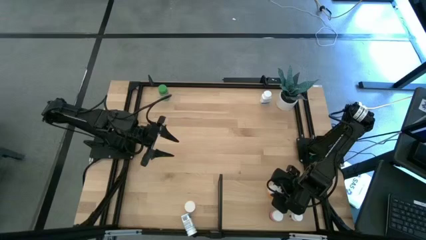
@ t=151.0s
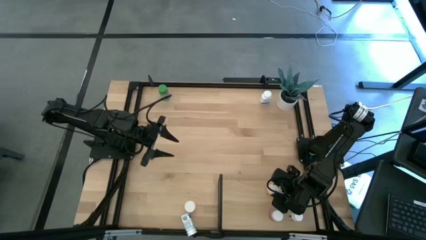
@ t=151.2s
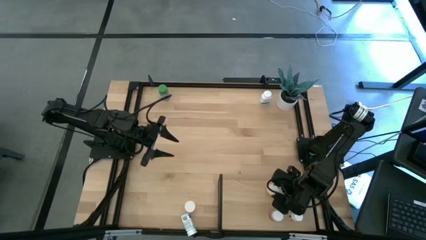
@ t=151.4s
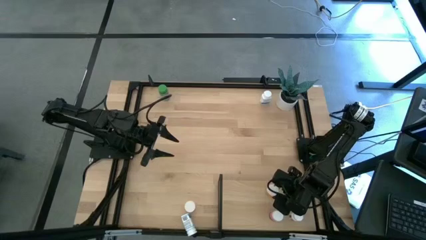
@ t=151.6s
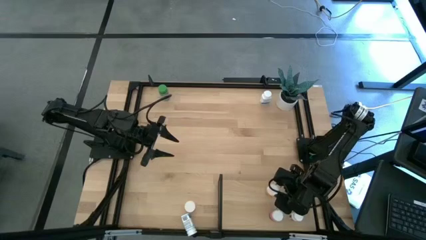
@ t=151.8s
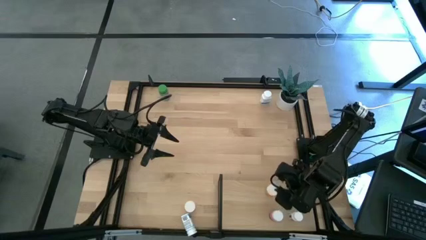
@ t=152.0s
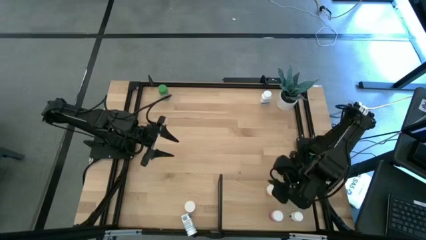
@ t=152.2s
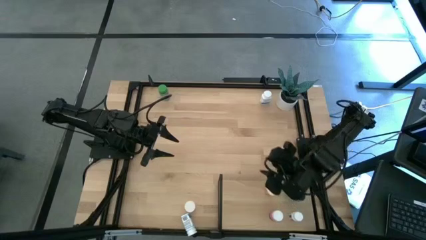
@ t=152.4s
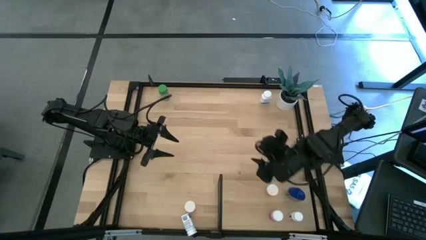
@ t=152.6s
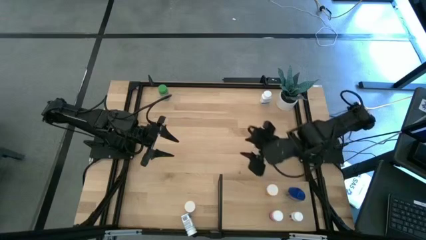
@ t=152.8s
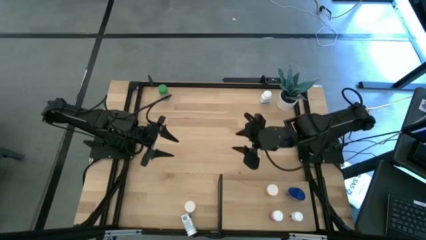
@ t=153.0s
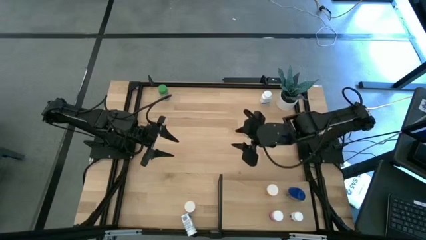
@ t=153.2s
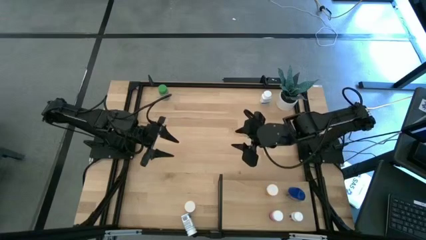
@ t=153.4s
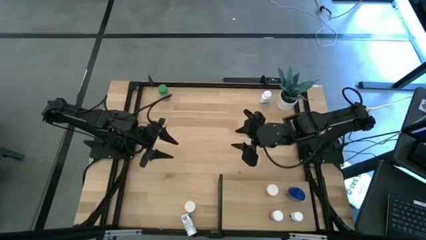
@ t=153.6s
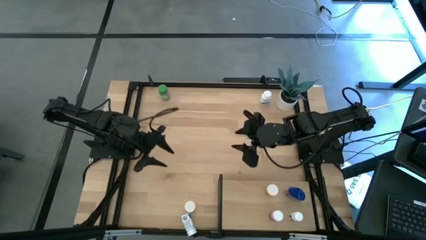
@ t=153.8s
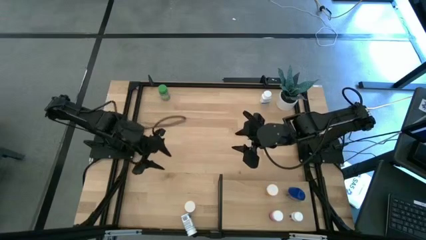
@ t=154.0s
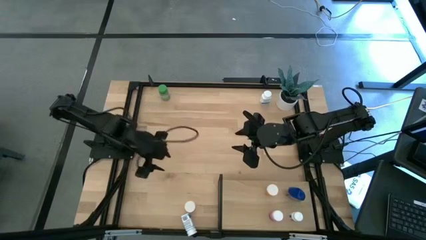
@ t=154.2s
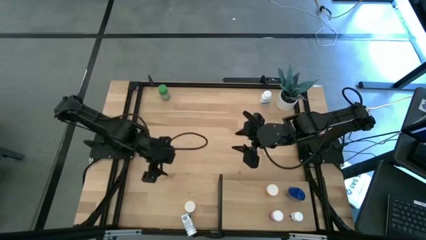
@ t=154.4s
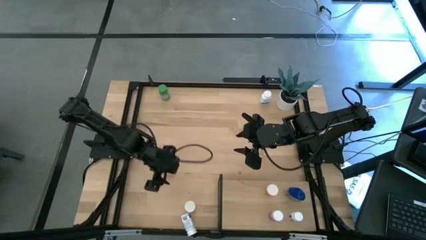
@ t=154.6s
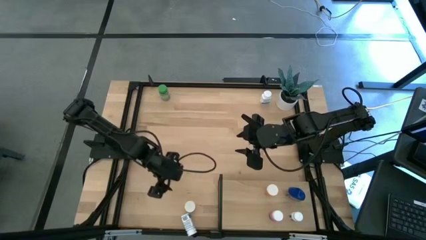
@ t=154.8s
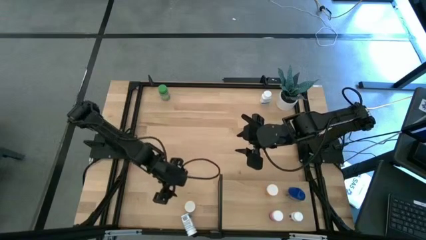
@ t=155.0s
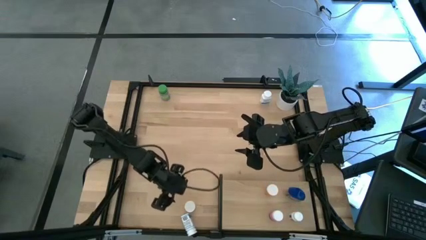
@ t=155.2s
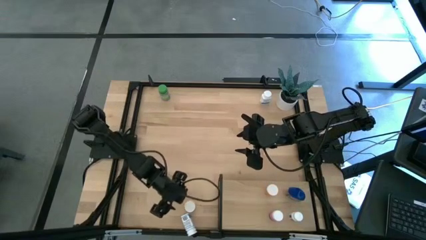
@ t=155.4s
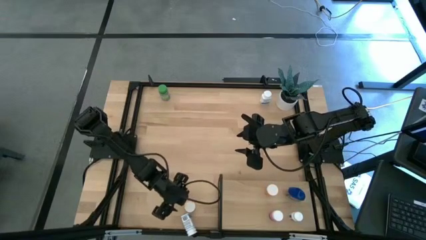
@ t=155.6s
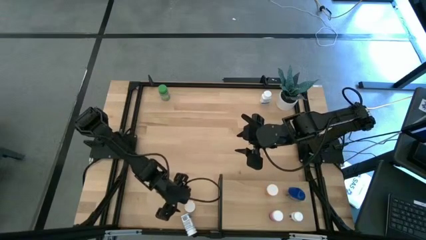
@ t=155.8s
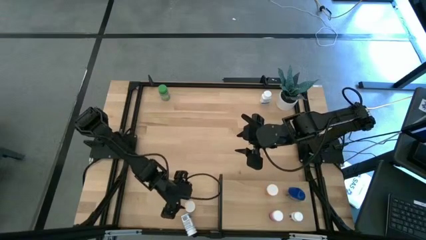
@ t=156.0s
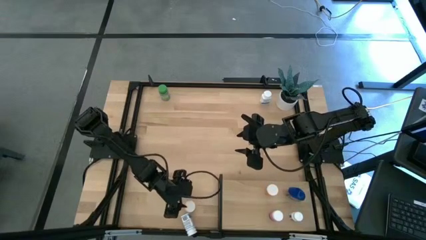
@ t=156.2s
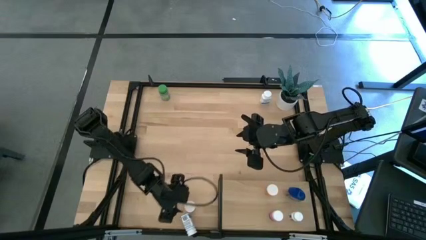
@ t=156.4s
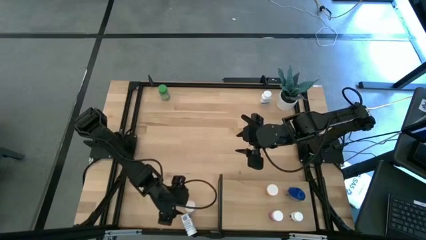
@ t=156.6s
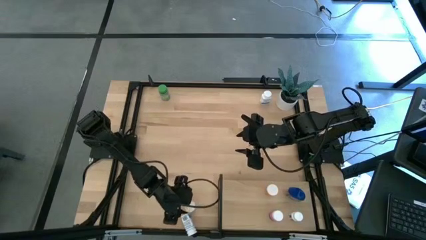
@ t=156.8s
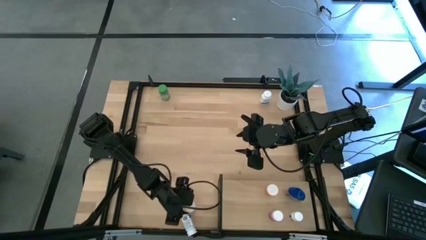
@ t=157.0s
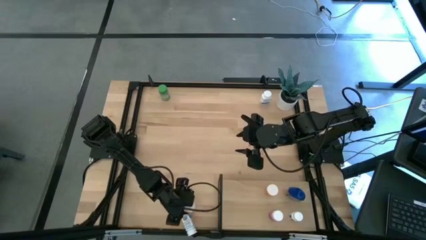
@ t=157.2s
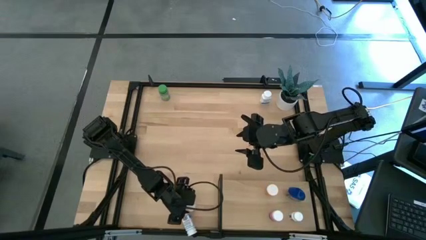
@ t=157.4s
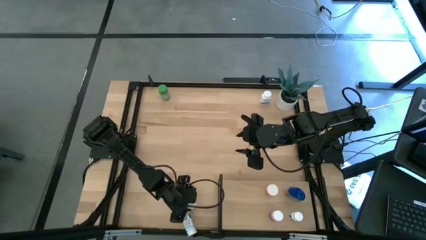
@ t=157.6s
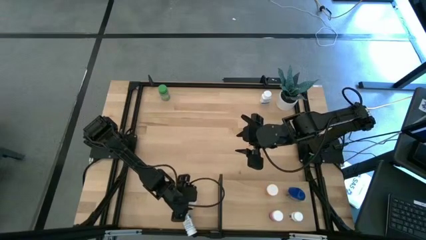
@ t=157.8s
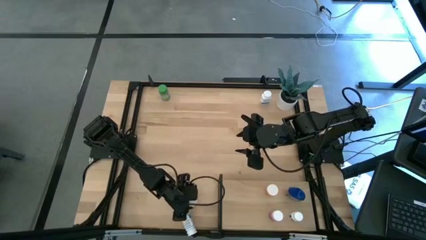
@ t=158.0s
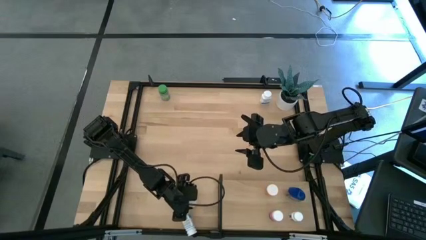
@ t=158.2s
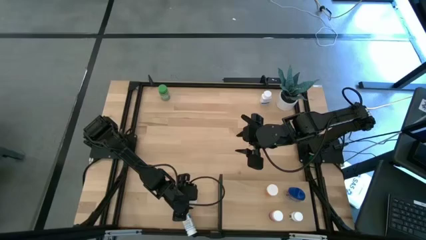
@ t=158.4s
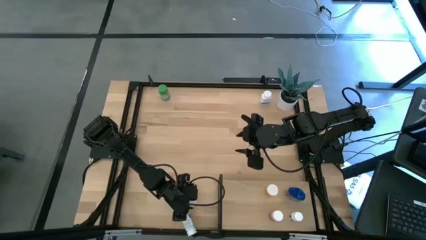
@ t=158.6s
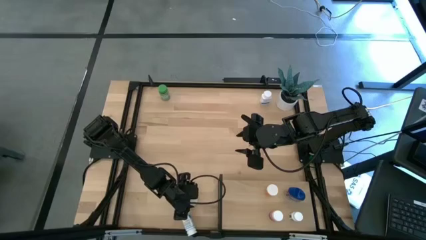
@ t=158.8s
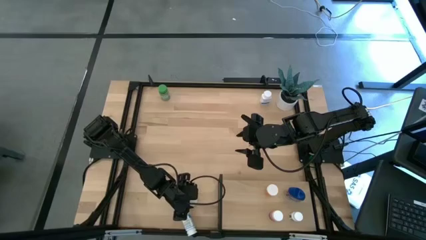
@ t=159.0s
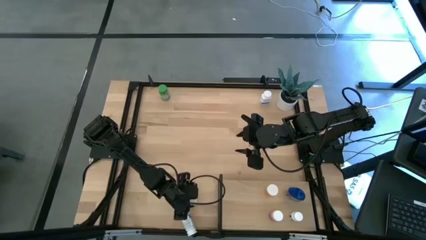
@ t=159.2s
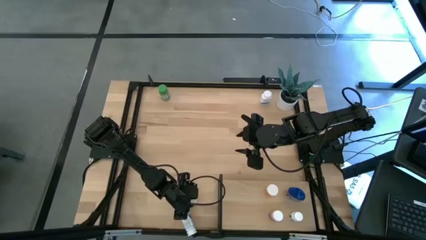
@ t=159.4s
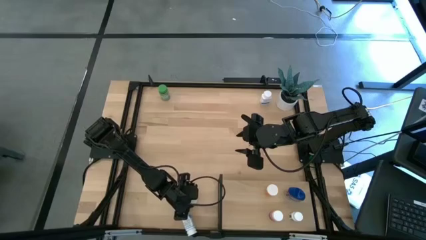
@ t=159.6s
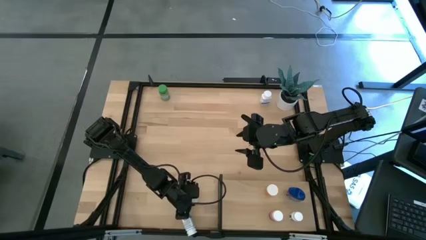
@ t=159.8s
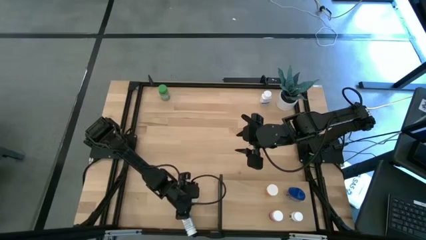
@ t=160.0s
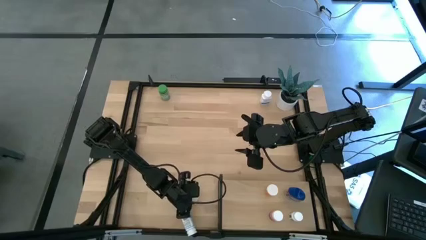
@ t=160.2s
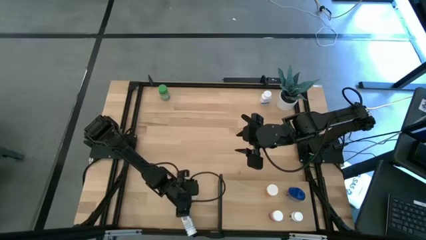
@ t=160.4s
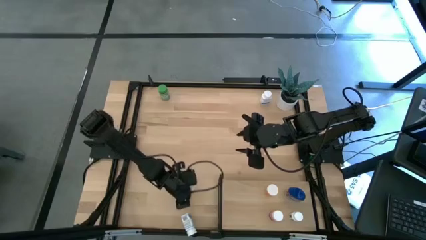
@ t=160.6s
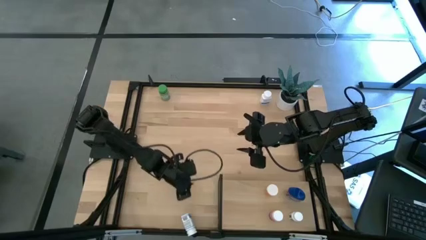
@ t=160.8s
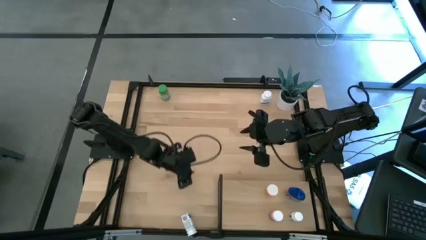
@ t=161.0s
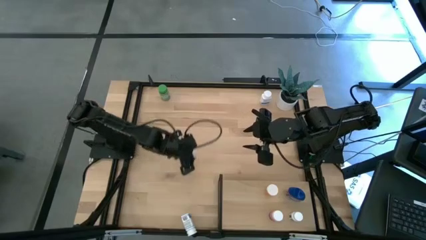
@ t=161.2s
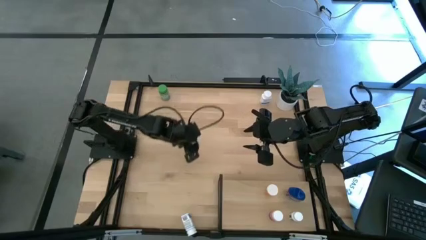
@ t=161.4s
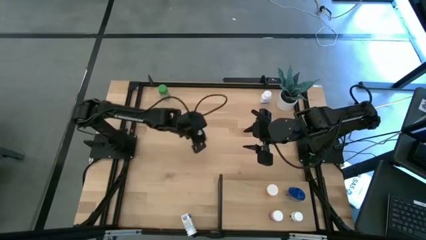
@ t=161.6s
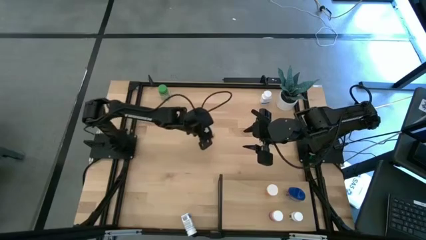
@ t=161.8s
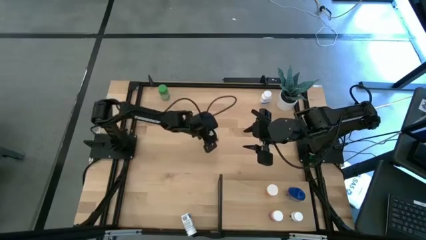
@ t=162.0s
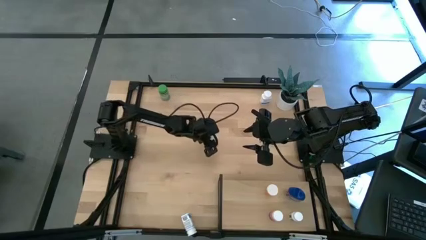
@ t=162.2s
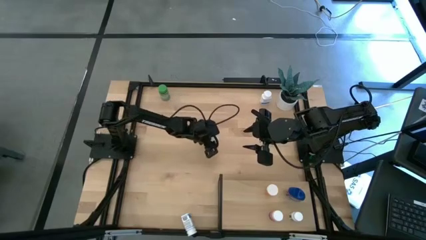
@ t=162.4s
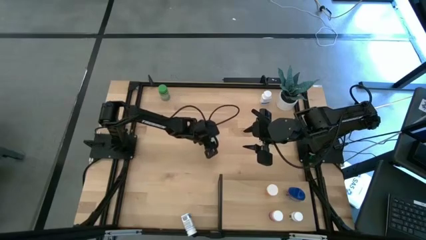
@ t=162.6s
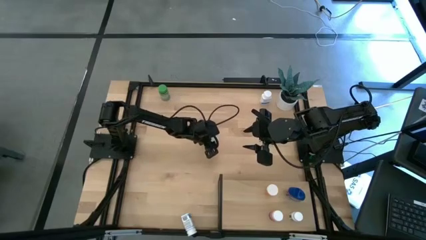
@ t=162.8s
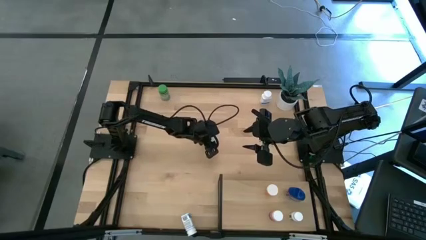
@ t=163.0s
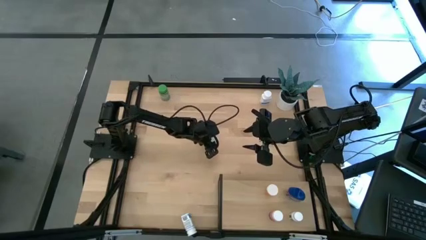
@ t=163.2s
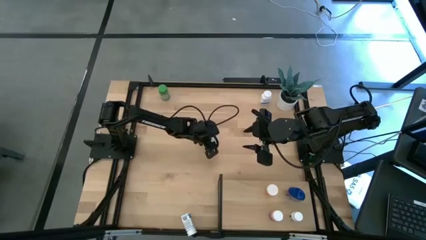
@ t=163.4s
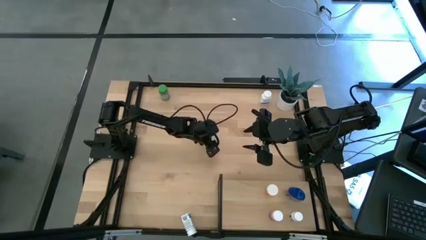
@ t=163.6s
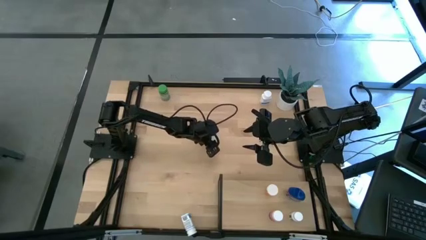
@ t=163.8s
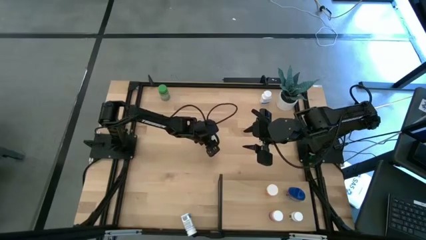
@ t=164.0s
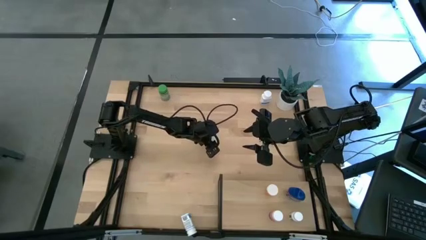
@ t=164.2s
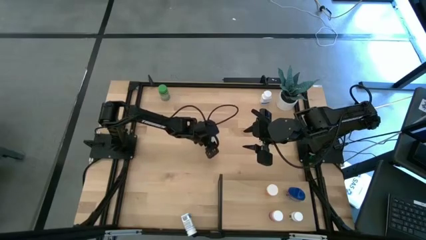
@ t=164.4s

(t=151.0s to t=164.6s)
Task: Pick and place medicine bottles onto shelf by color
Move the orange pill bottle from the bottom to the center
